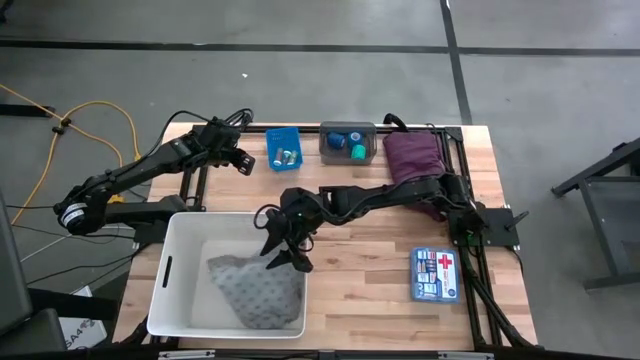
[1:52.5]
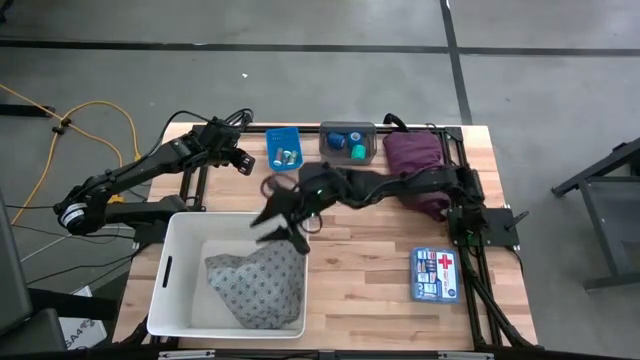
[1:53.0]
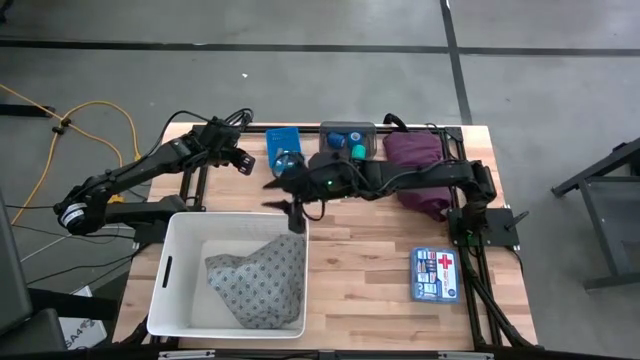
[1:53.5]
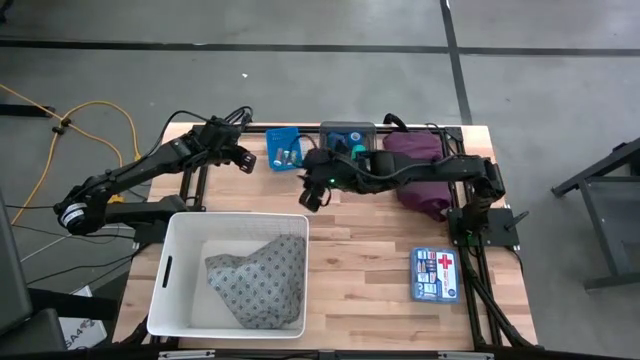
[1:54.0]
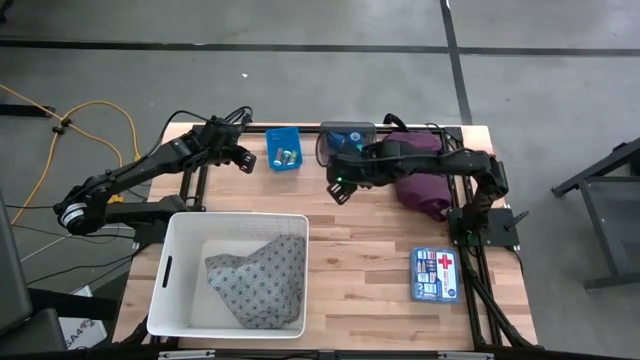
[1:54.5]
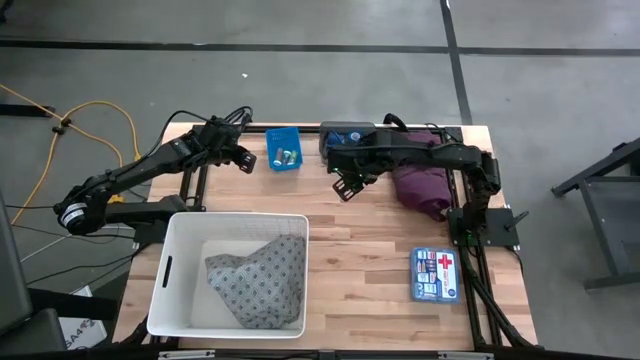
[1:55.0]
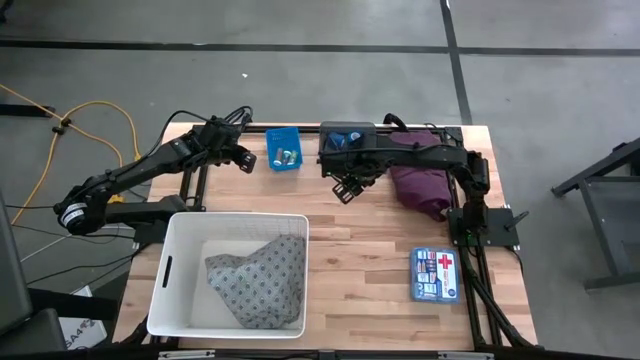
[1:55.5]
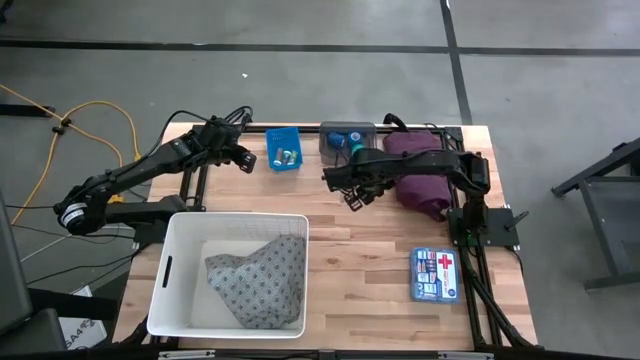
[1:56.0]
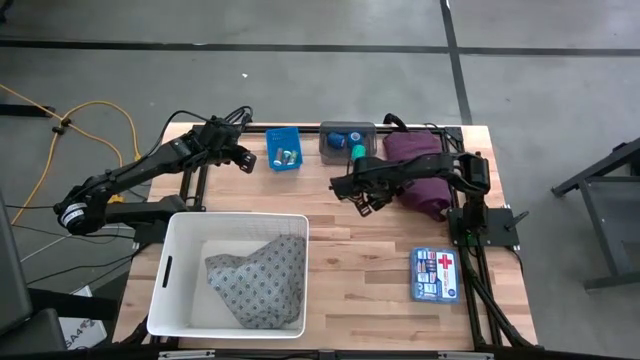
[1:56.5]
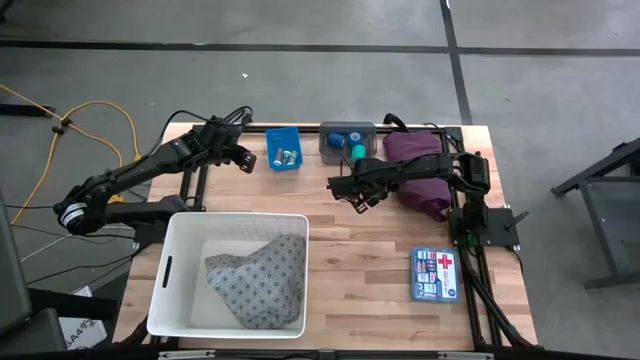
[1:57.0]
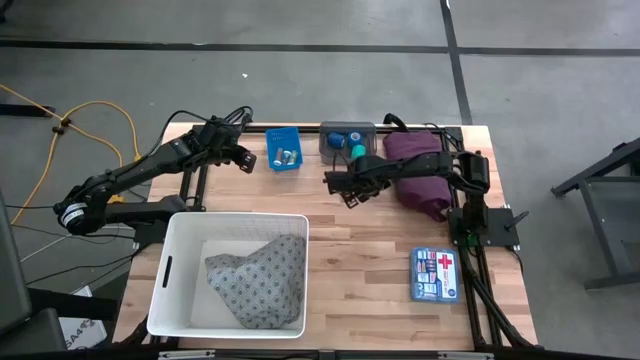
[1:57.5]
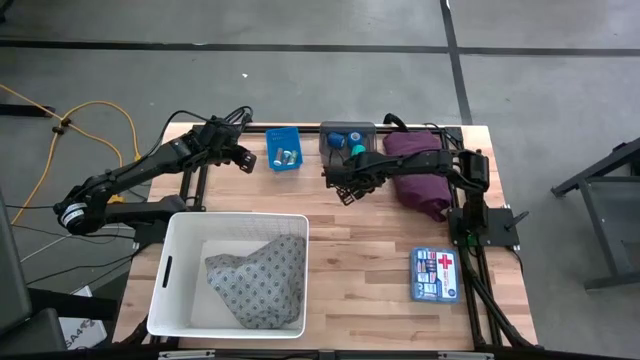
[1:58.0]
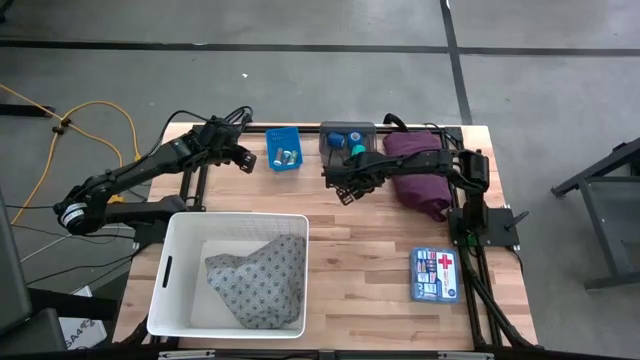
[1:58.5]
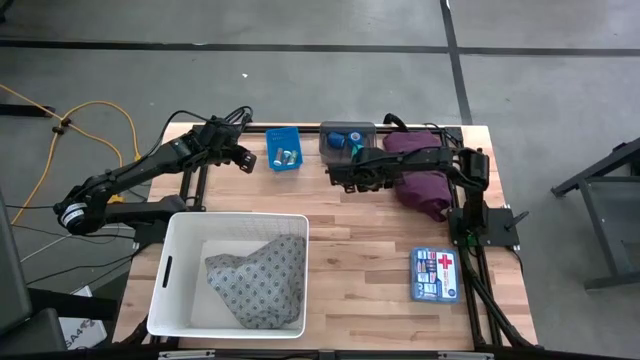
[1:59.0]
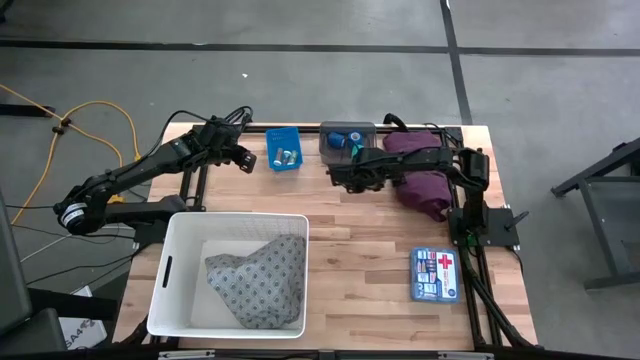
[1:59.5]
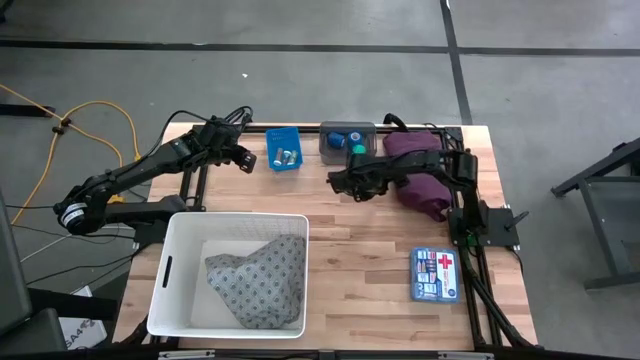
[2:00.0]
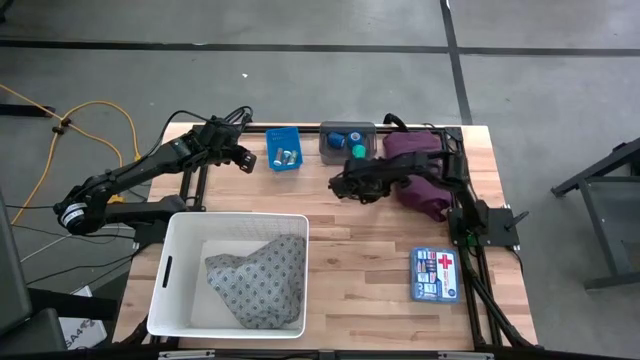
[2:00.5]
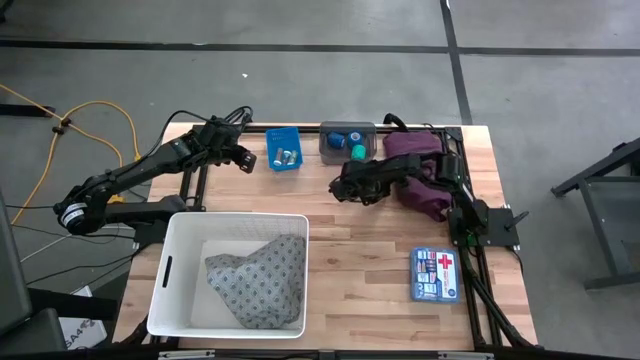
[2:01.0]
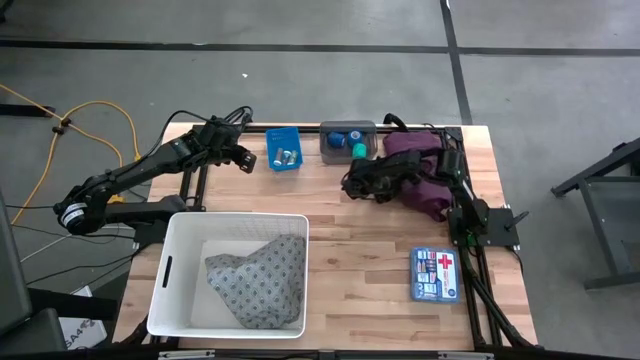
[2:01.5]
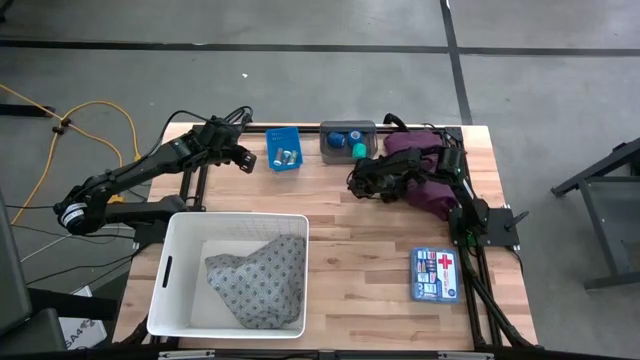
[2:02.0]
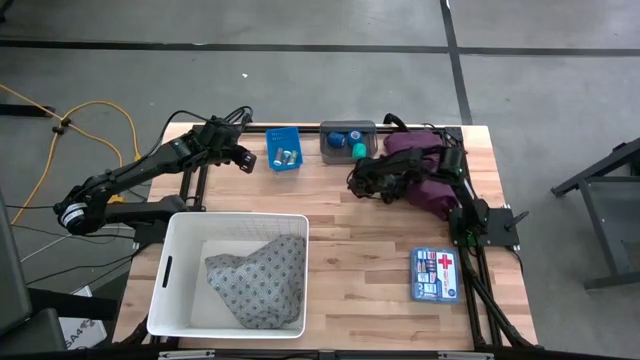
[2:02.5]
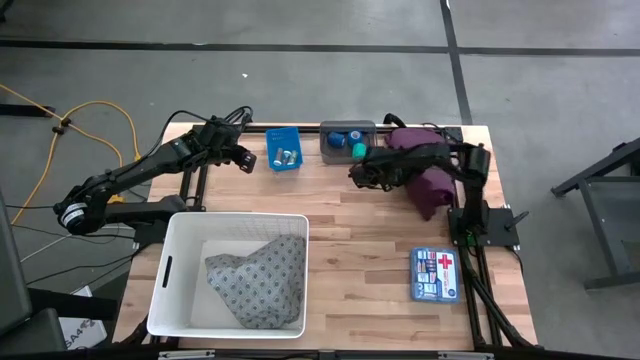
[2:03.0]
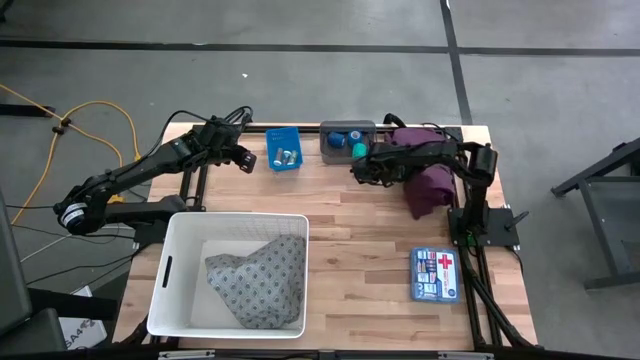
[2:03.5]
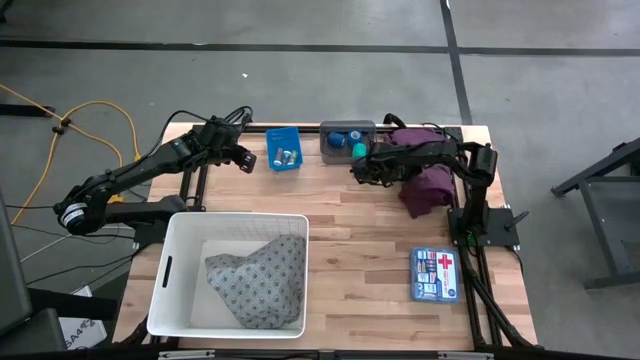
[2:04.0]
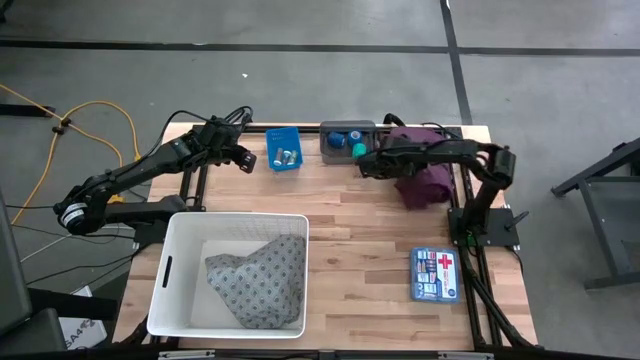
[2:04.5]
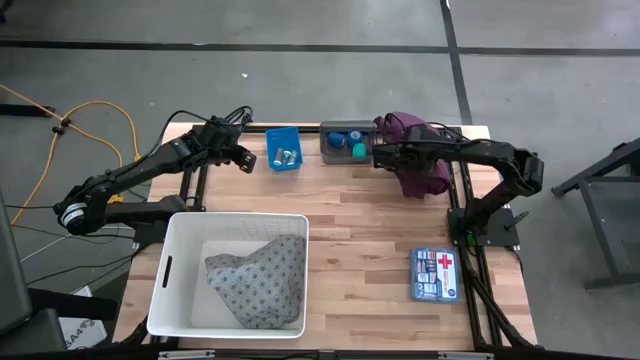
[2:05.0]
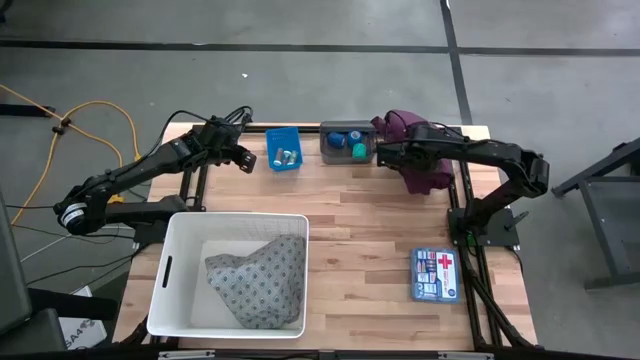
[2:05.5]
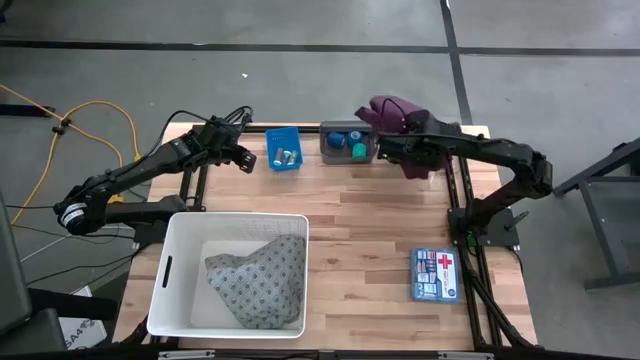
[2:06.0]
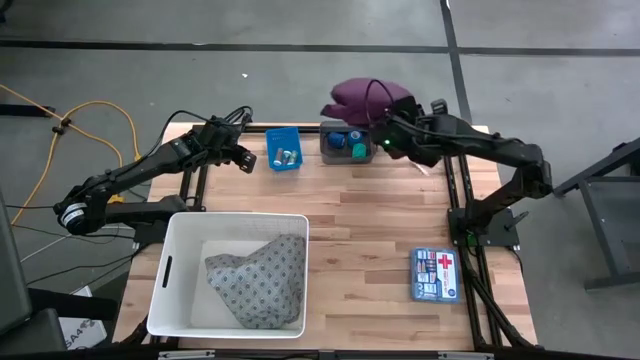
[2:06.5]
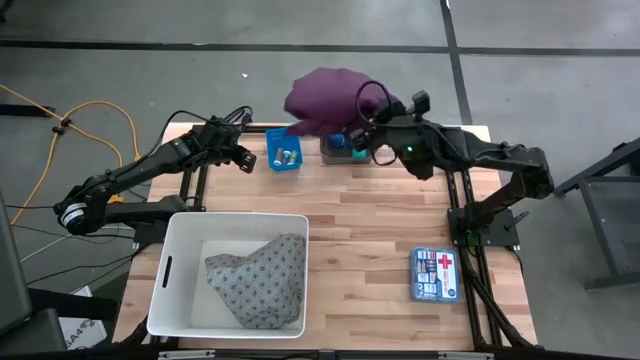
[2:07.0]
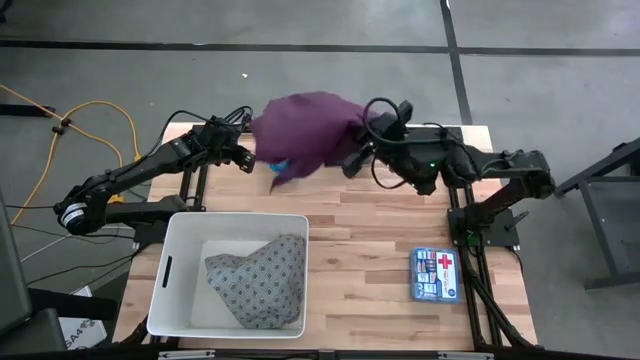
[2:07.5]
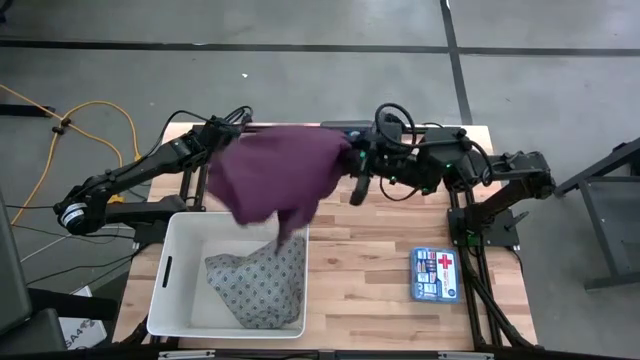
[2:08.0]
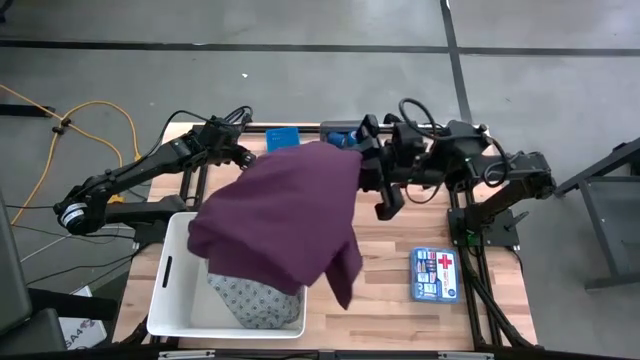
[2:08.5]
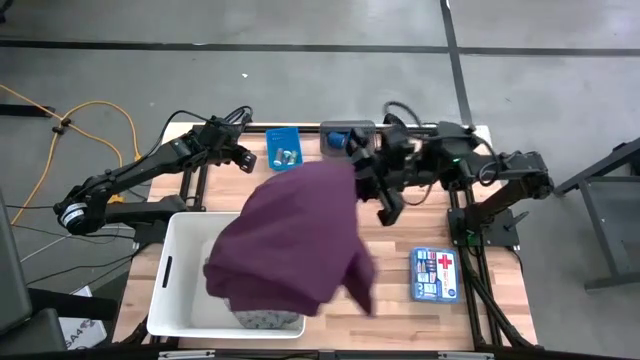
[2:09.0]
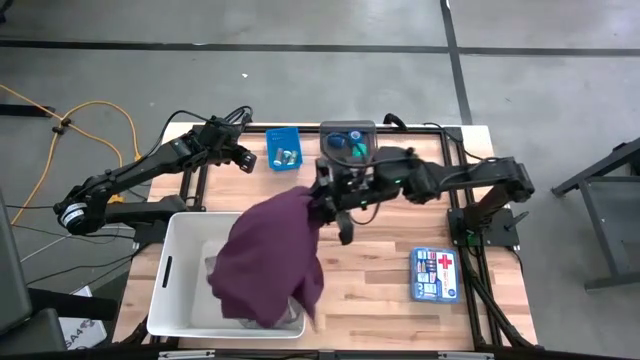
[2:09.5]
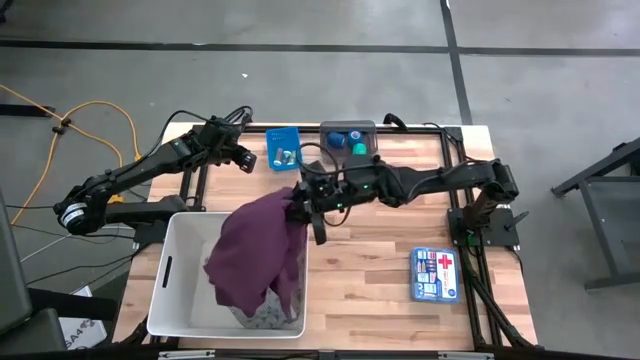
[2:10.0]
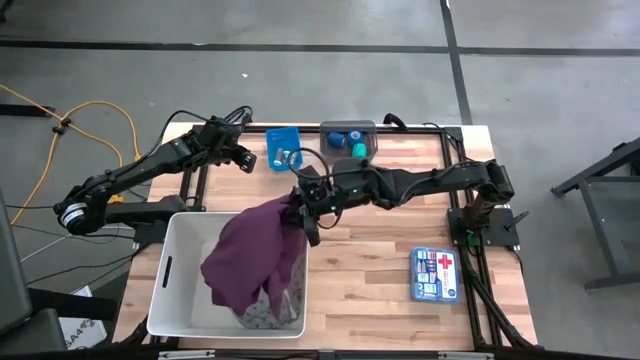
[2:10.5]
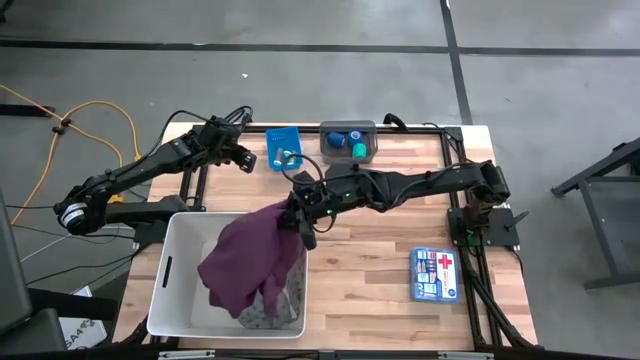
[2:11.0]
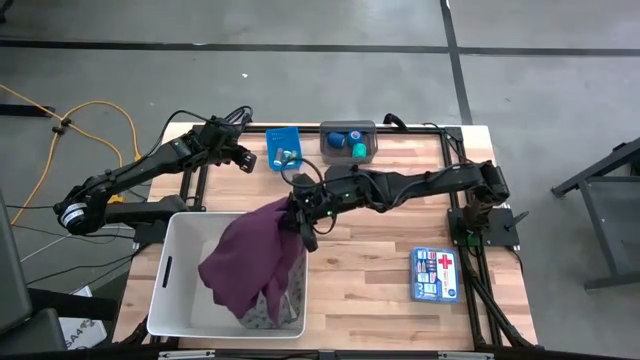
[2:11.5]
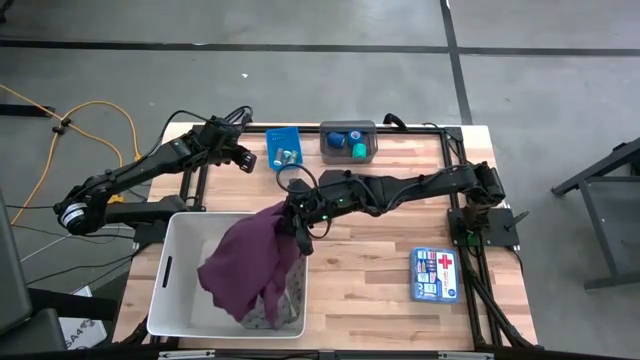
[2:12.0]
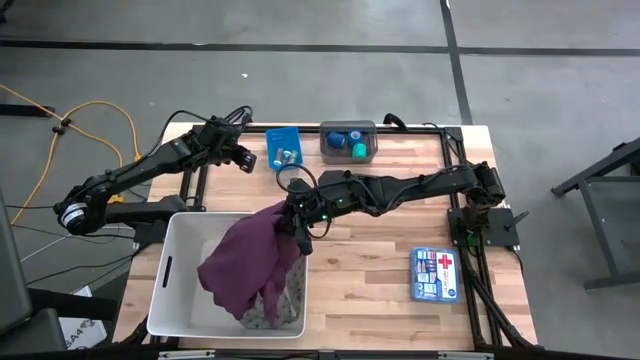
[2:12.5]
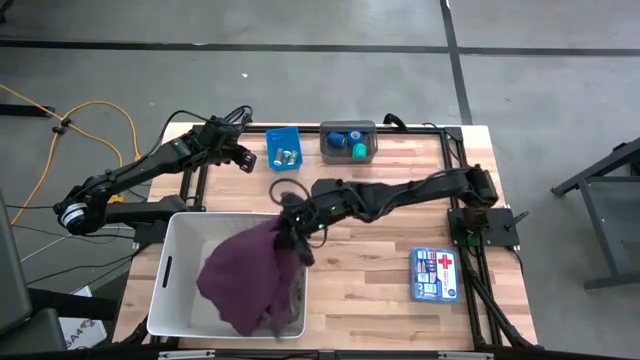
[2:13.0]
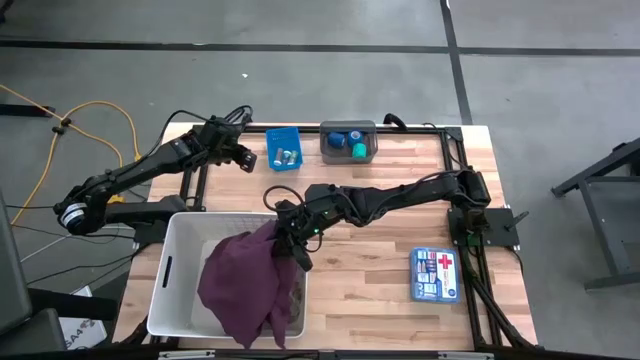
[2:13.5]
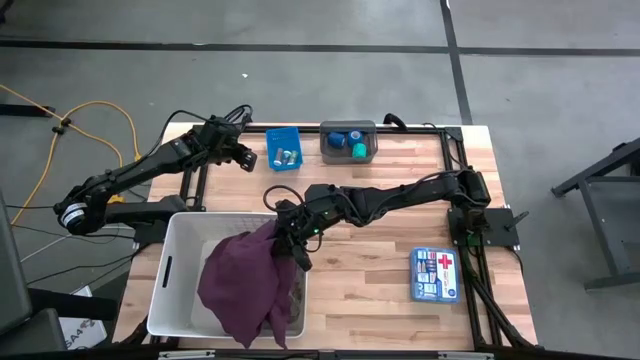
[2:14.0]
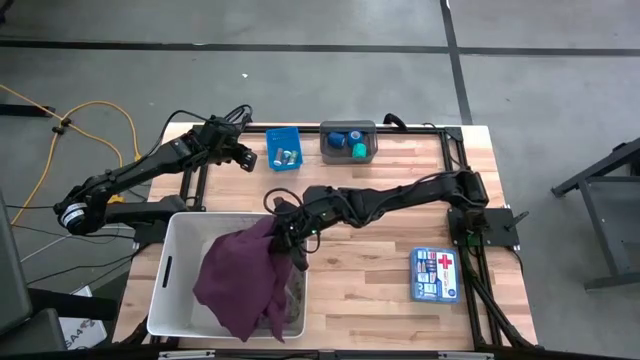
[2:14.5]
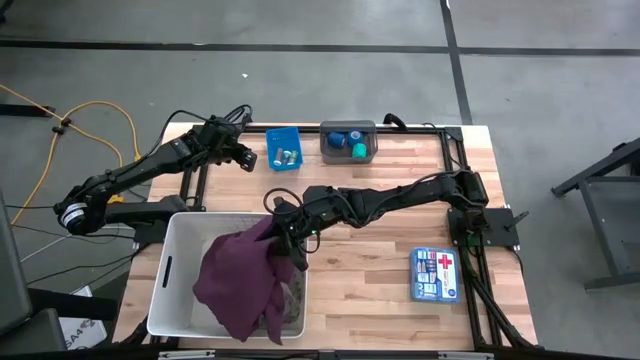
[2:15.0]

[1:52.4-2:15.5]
Task: Pick & place medical supplies in basket/bin
Put the purple patient gown into the white bin
